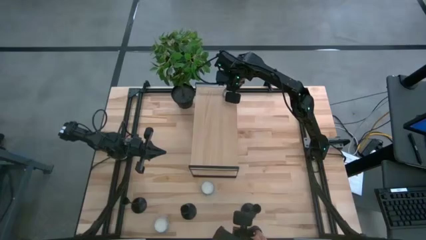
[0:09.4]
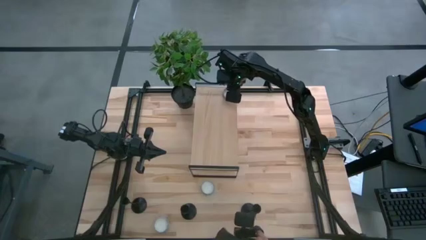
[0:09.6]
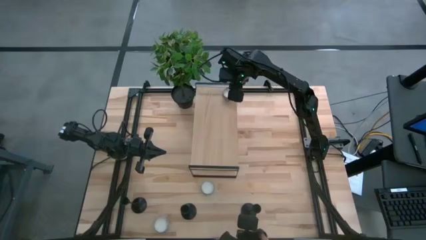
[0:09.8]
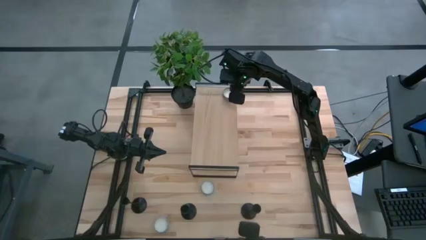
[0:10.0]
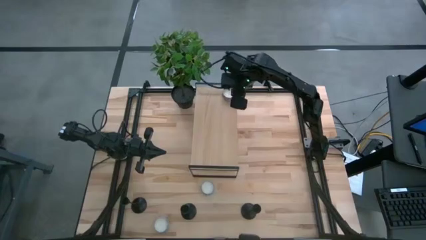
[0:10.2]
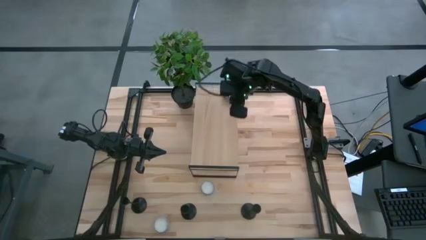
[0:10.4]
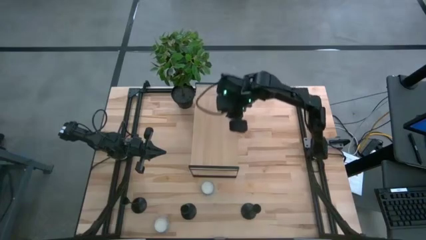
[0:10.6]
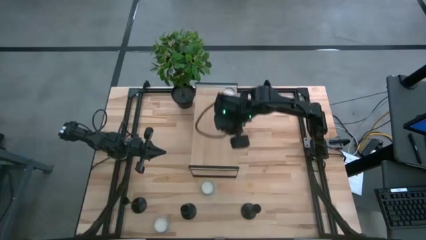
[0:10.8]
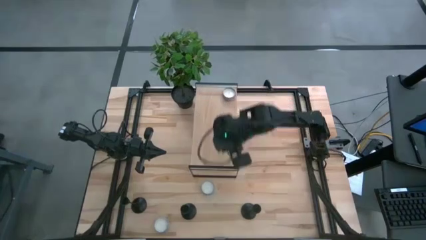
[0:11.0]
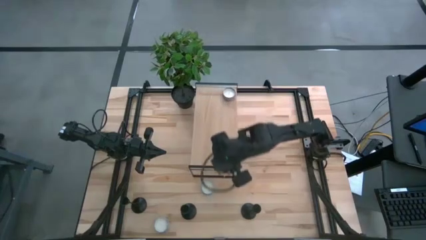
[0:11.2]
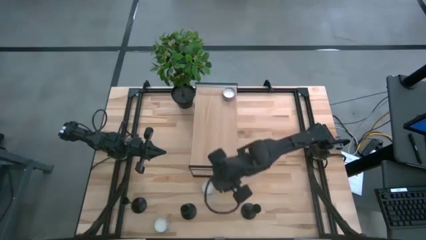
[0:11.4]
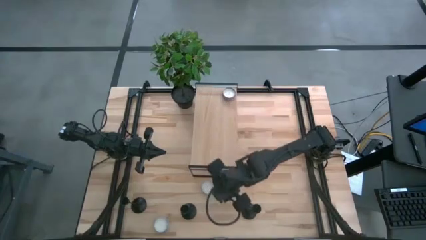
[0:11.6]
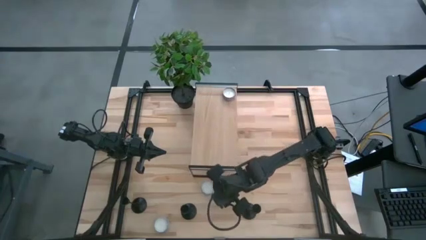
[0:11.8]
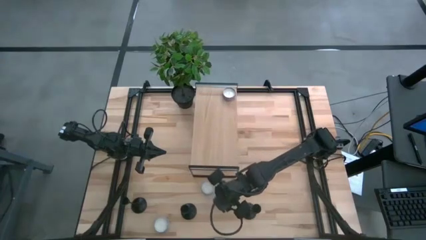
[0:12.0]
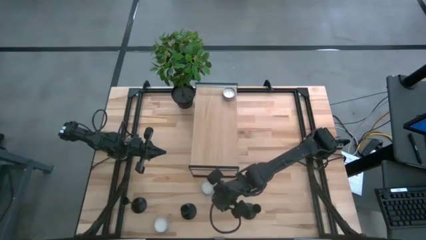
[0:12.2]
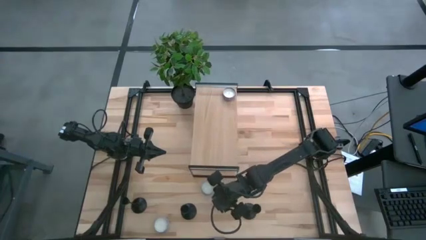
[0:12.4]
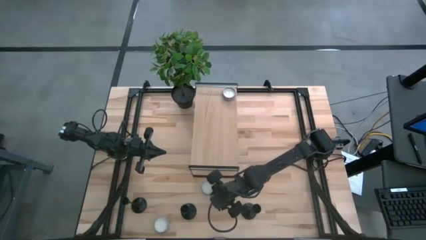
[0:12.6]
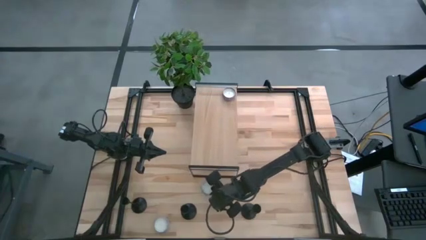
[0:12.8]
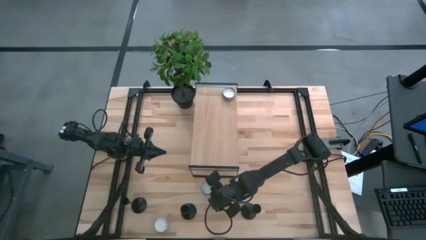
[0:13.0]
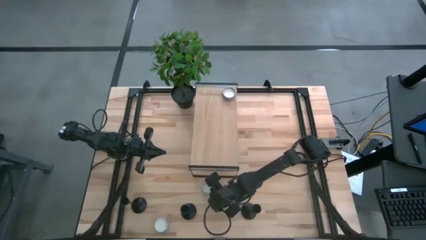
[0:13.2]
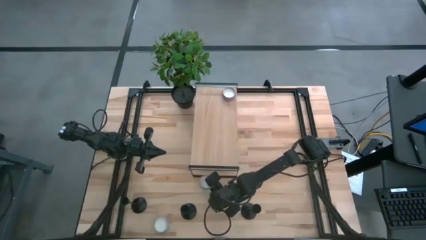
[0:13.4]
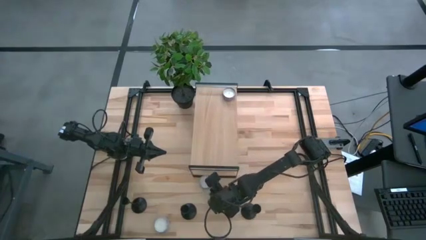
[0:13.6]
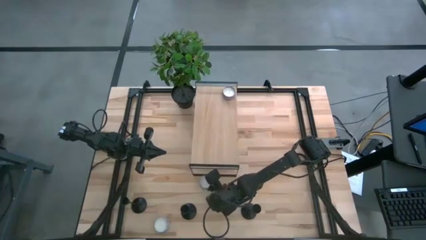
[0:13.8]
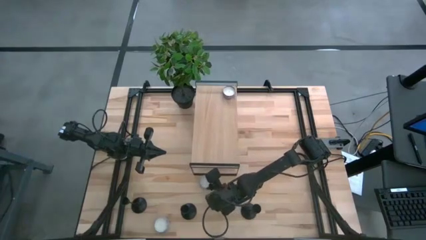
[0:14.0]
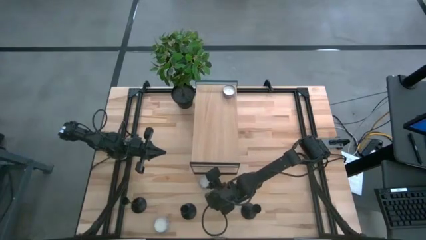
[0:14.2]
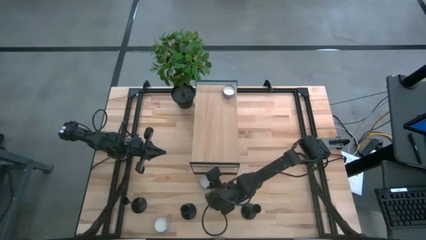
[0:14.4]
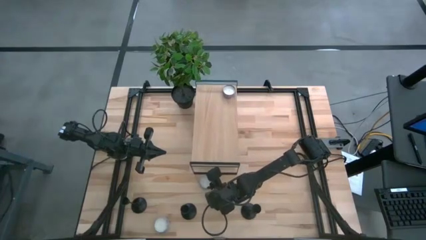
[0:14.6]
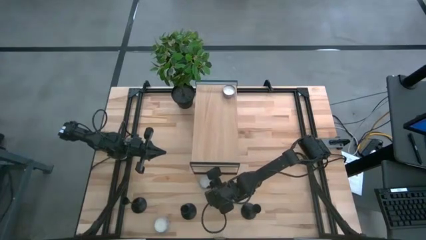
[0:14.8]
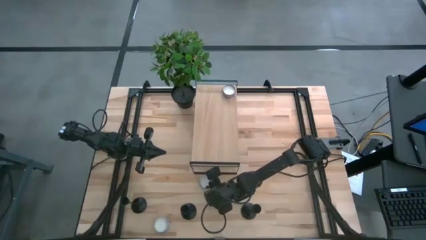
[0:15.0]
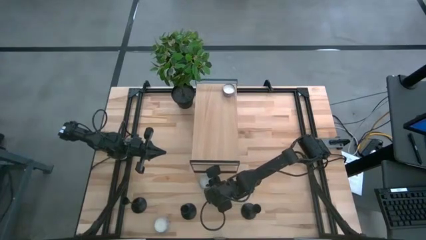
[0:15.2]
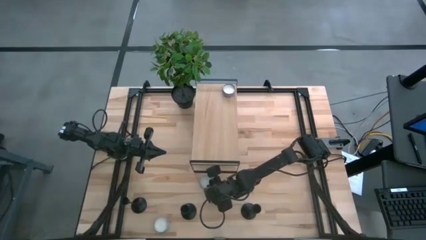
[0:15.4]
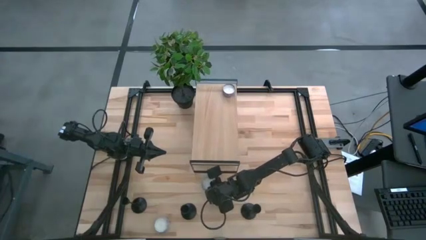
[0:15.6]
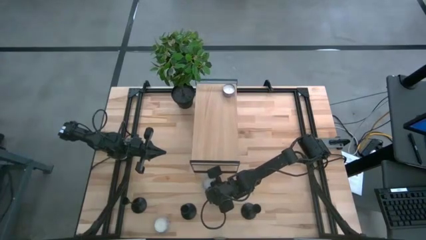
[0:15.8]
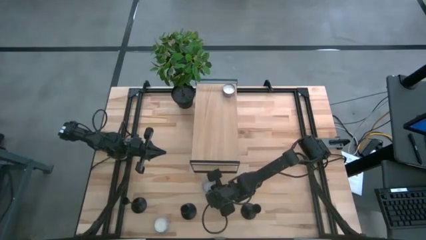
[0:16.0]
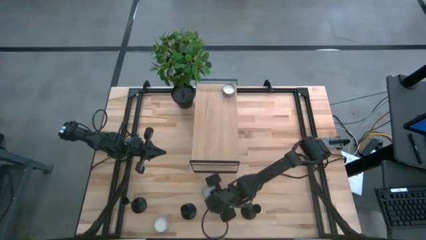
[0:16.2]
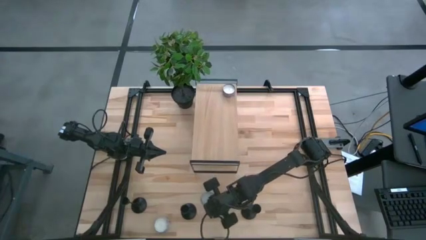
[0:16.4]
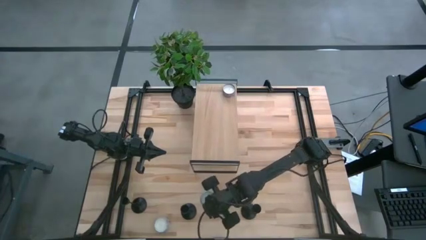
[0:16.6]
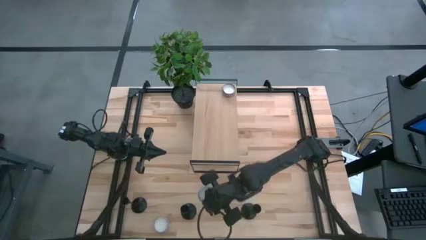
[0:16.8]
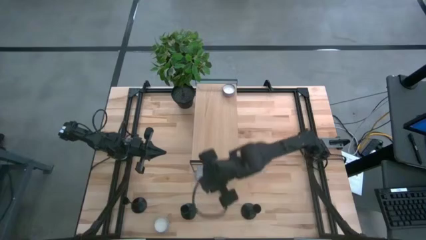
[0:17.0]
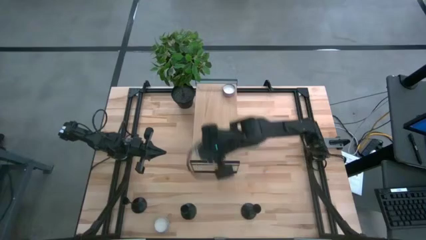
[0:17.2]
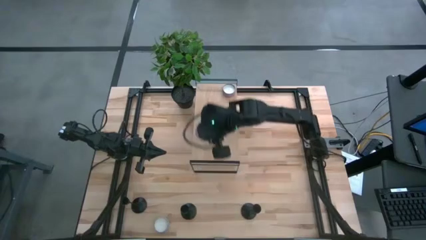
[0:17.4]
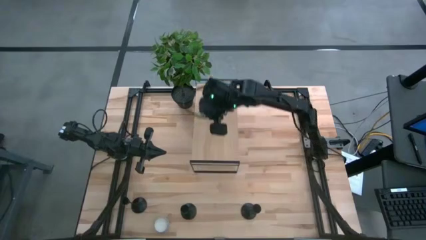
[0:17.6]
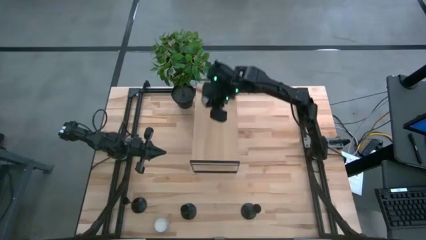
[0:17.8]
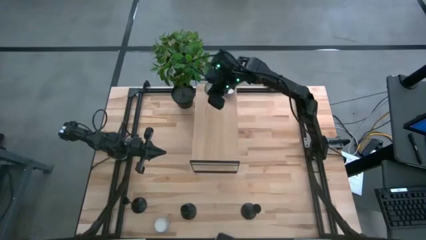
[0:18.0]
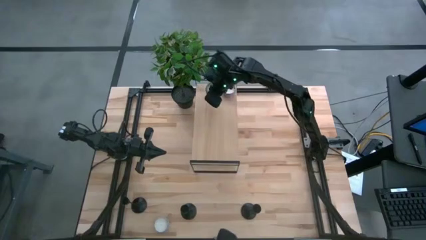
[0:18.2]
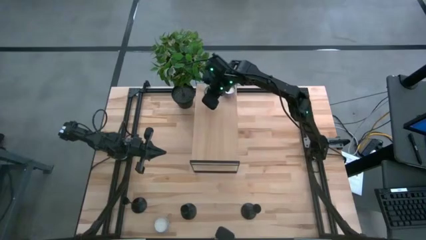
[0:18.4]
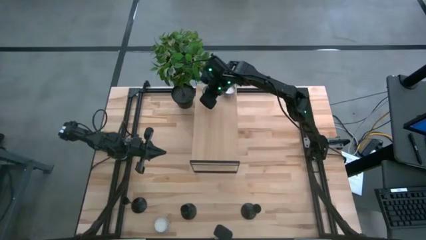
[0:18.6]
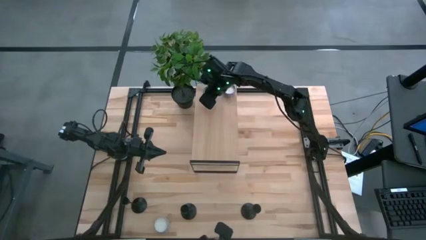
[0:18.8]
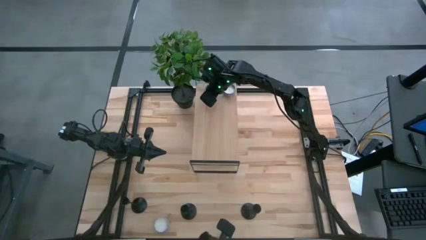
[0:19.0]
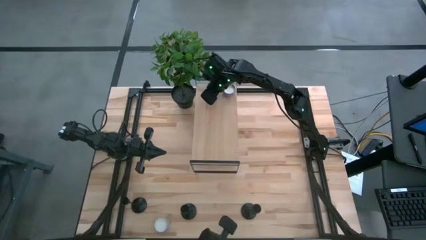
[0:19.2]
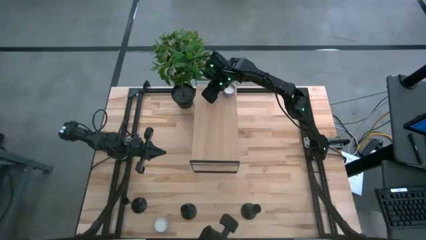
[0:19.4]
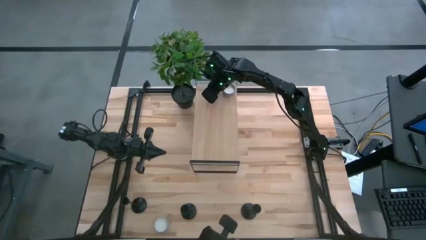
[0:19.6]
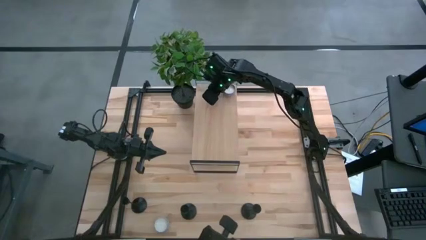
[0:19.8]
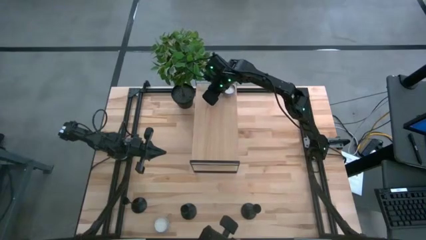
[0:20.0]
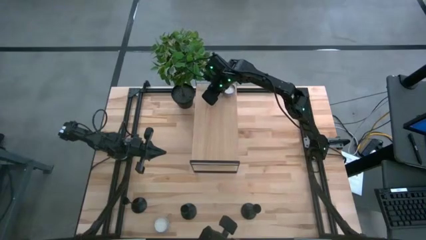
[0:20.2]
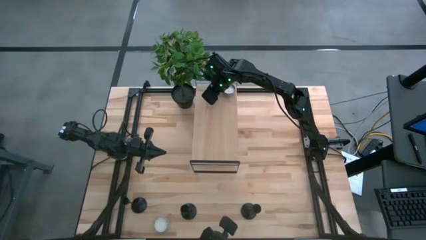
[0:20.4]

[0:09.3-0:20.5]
Task: Pick & Place candle stick holders
Put the top white candle on the shelf
